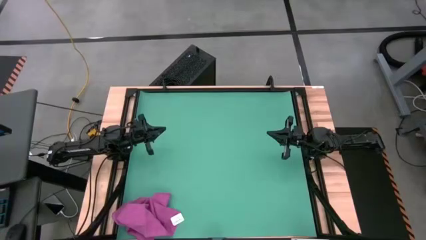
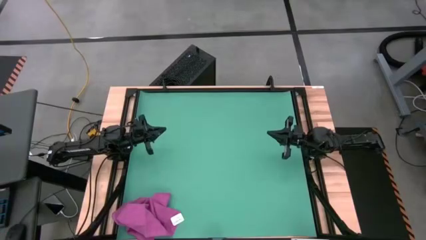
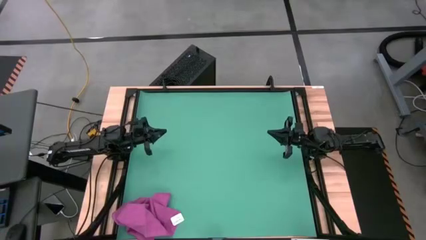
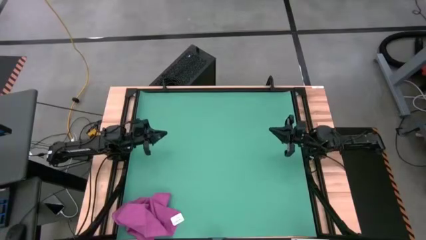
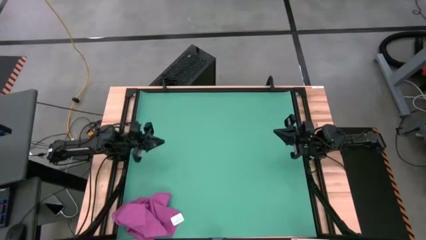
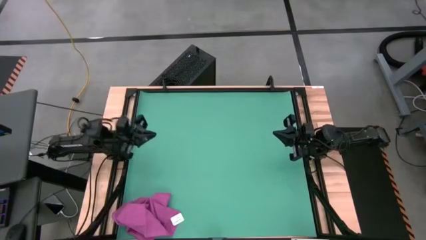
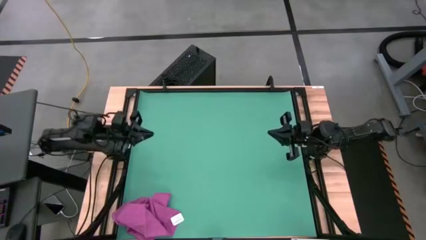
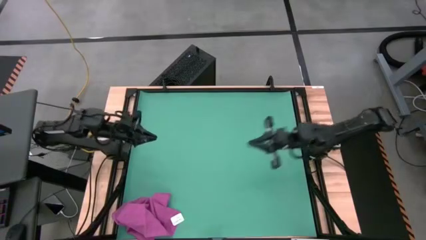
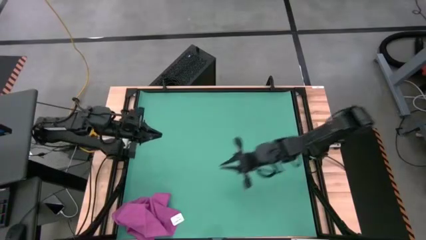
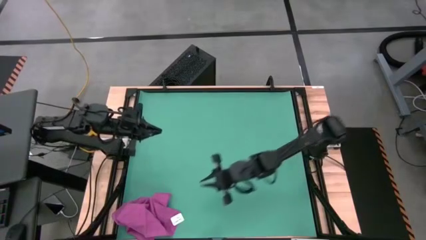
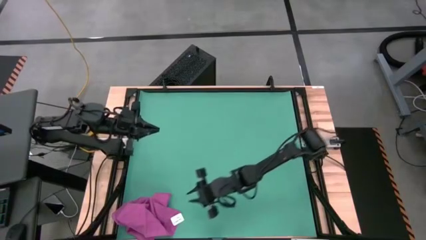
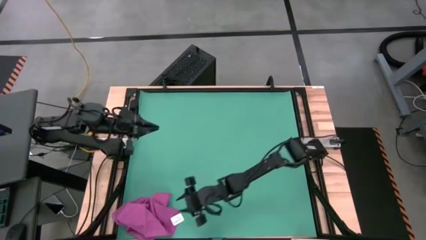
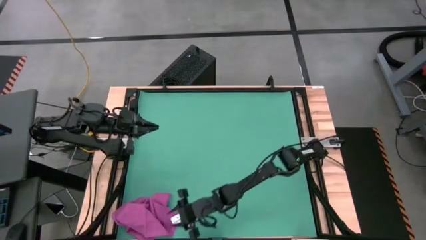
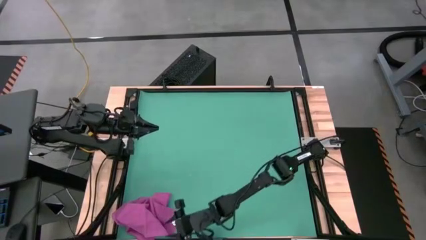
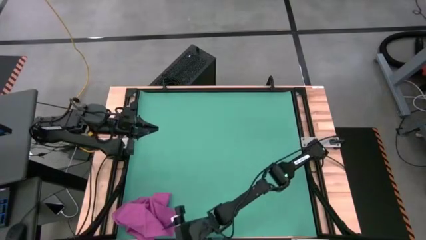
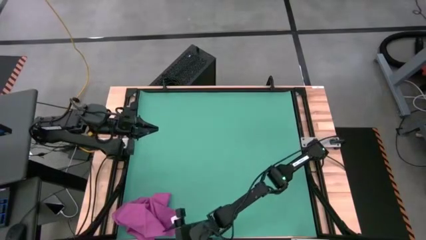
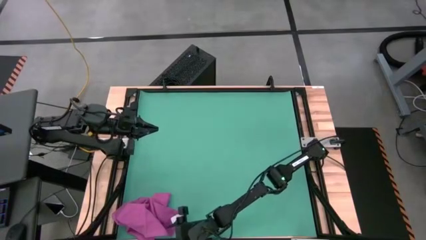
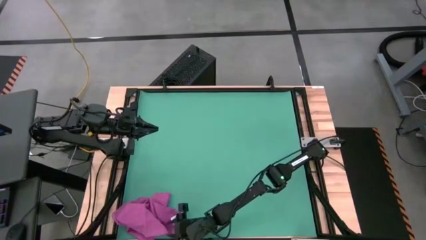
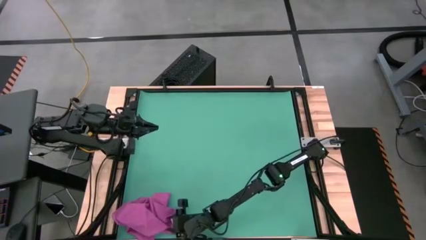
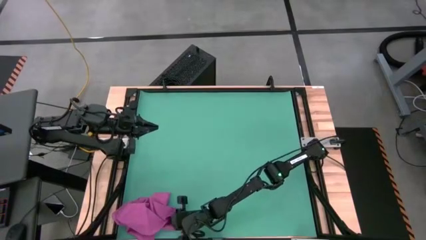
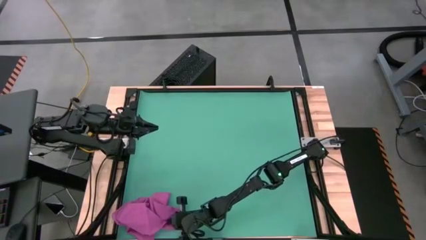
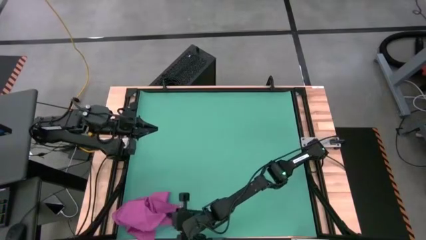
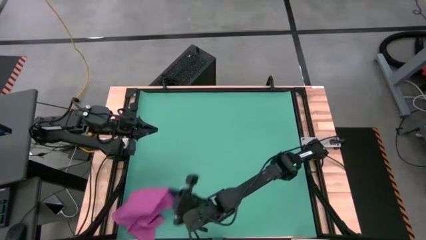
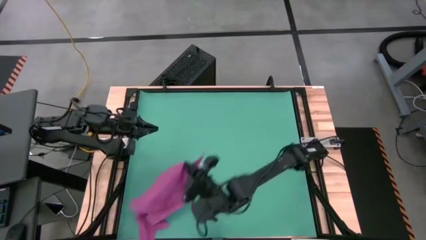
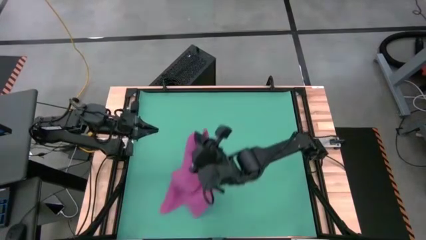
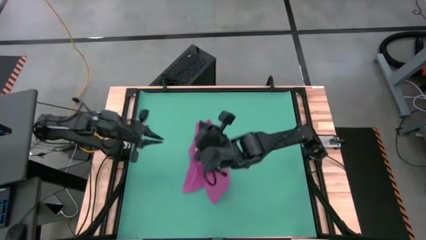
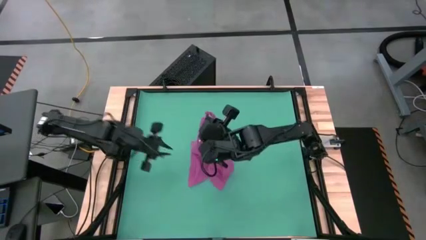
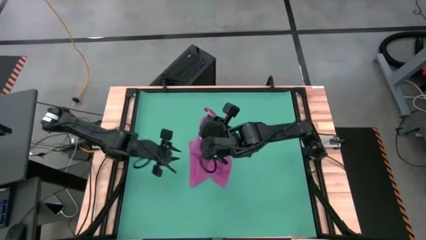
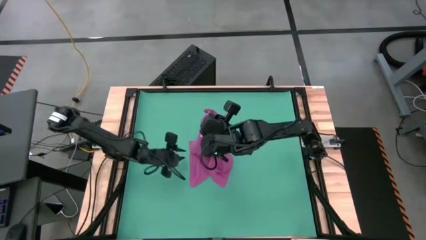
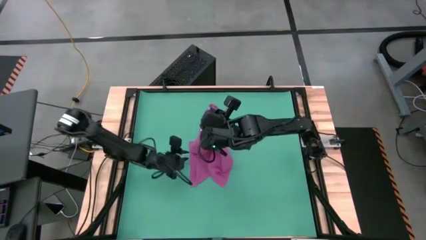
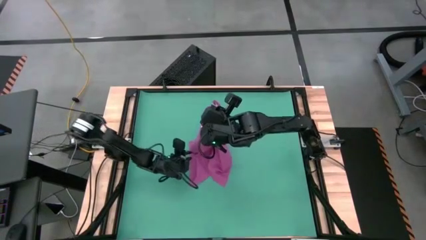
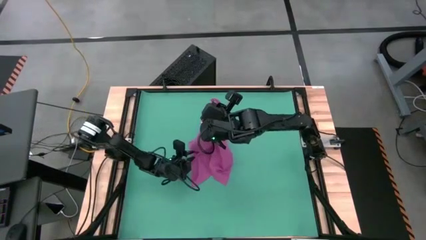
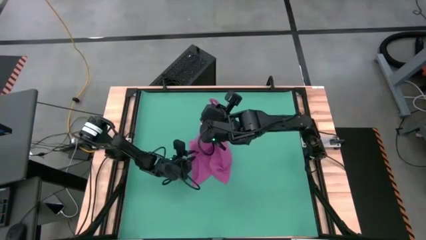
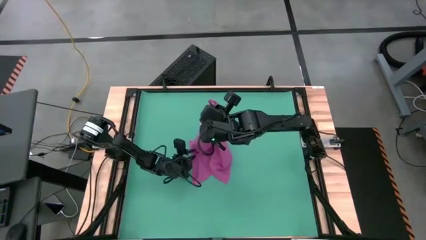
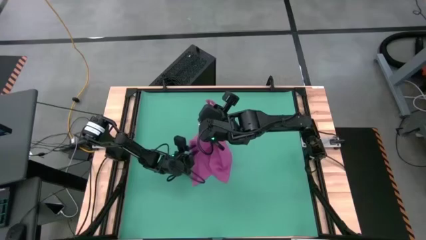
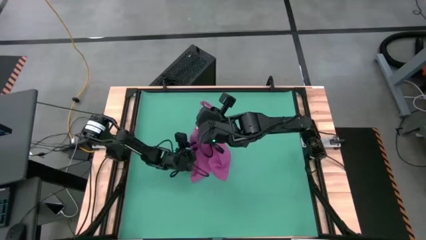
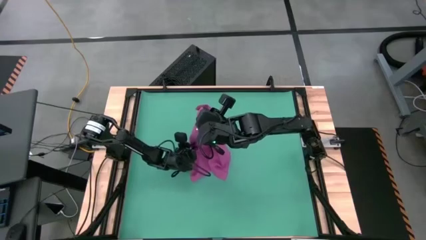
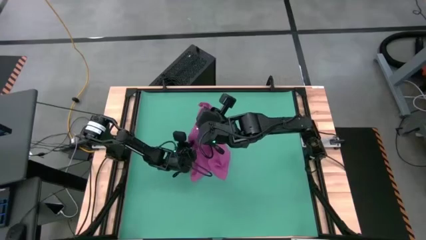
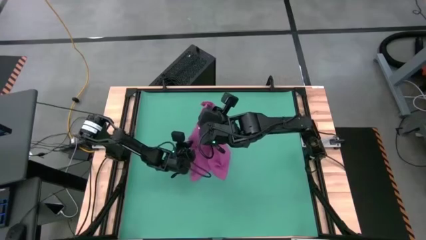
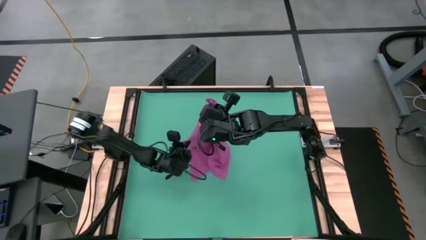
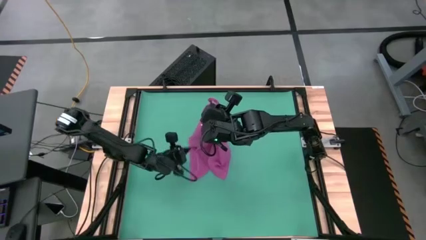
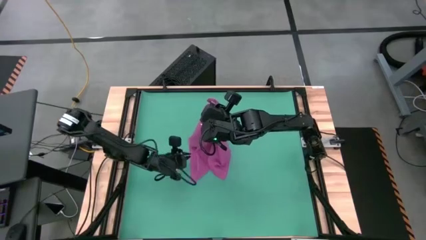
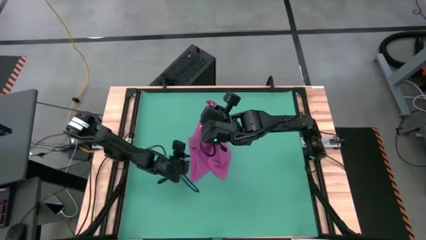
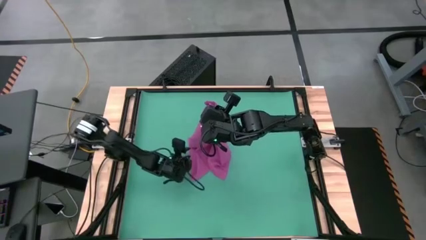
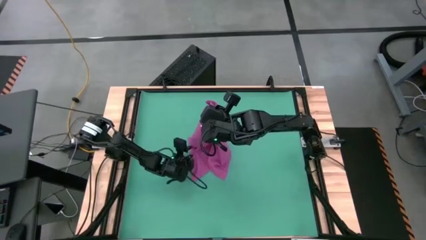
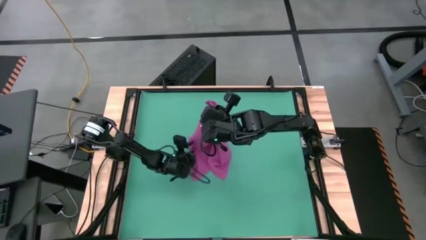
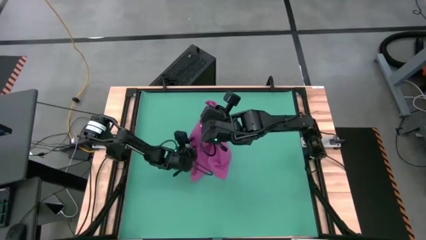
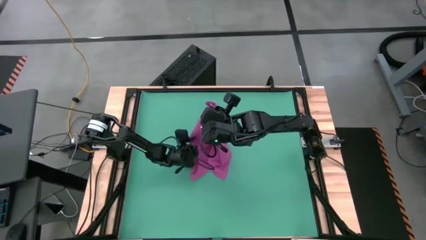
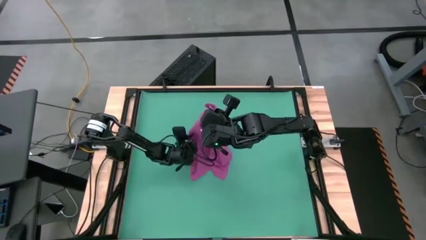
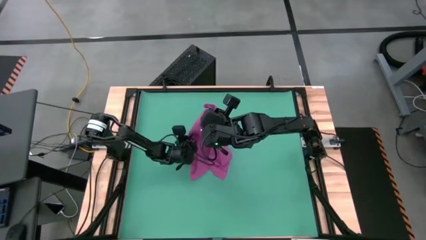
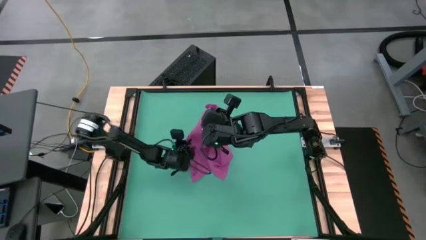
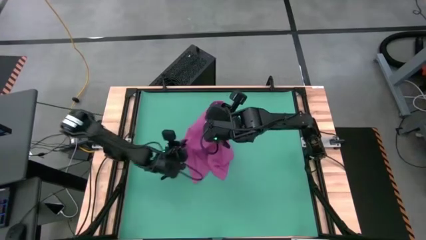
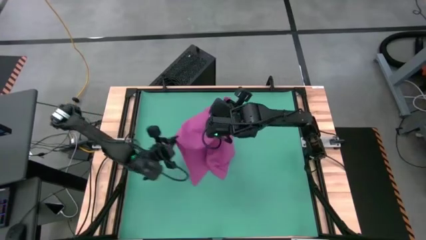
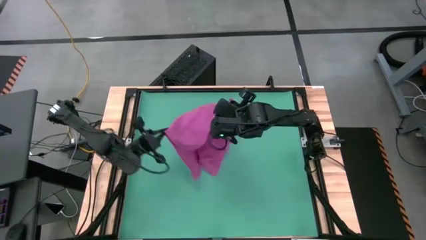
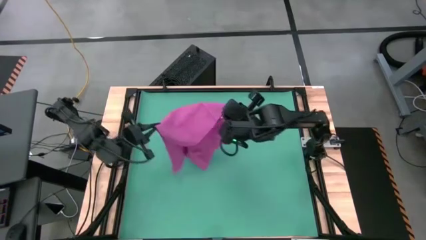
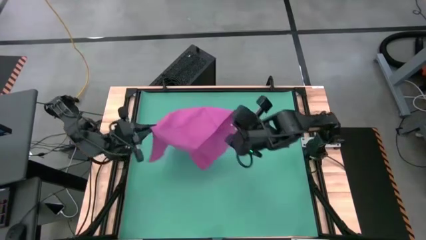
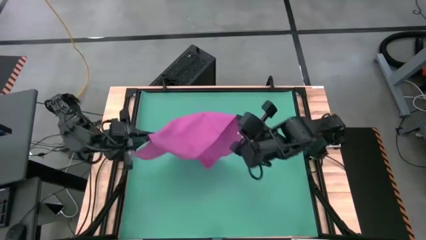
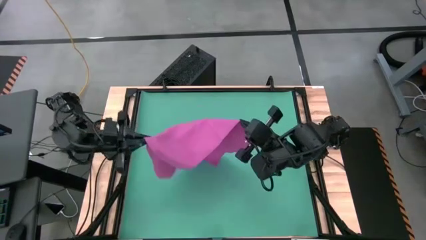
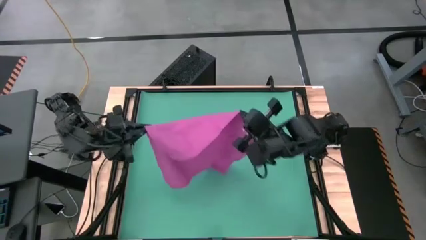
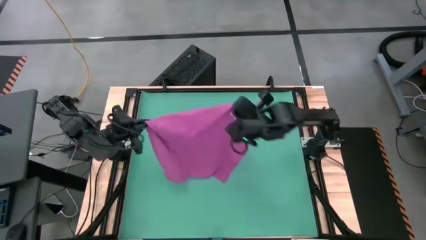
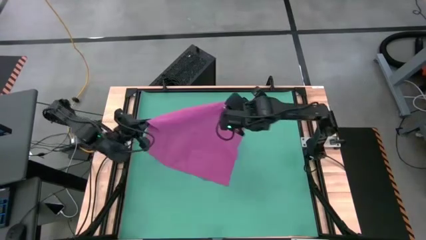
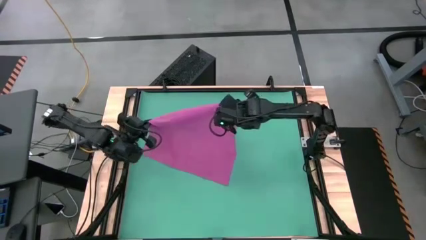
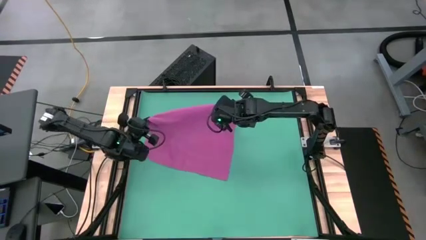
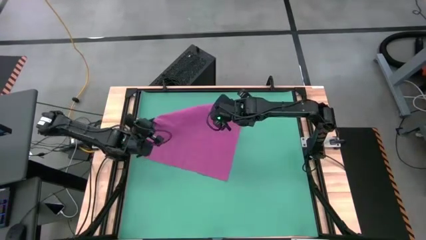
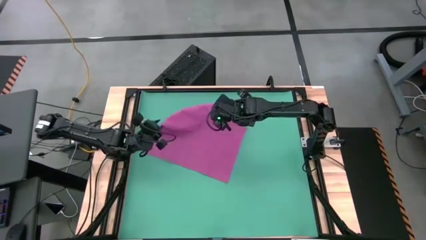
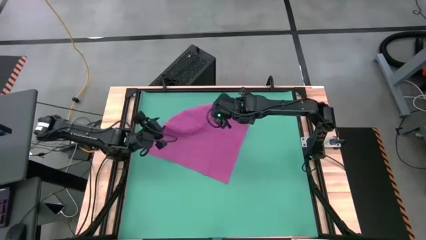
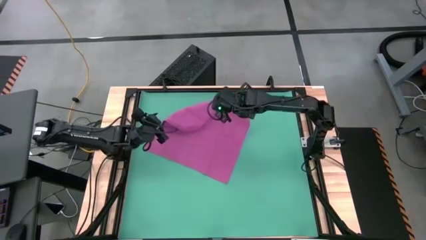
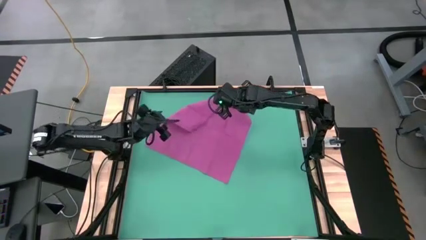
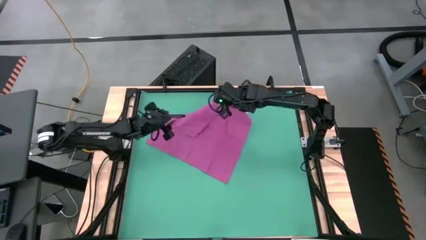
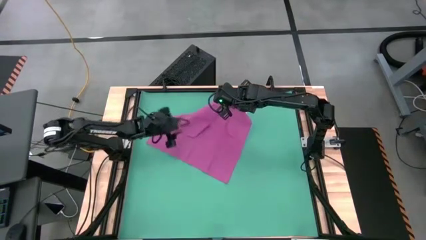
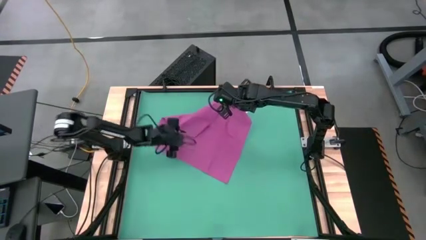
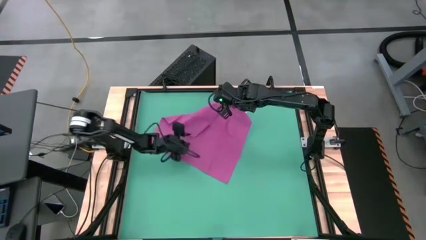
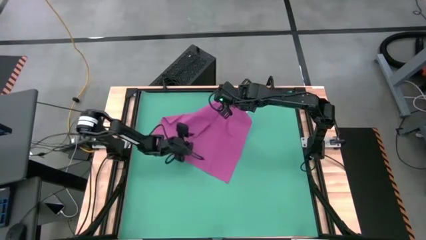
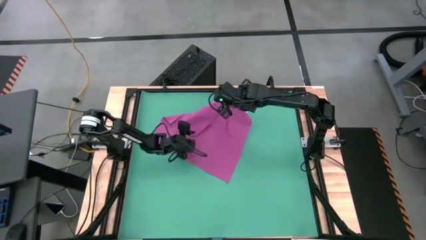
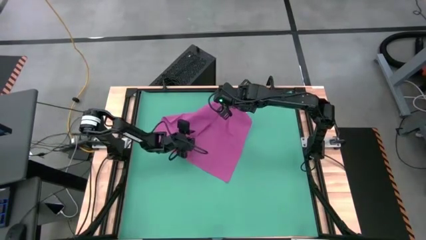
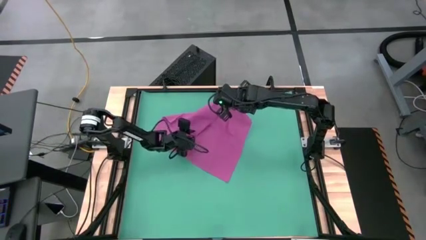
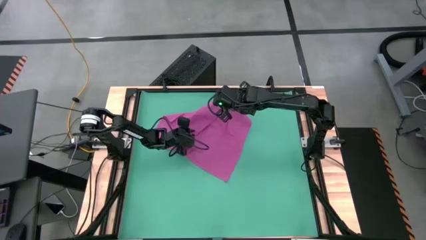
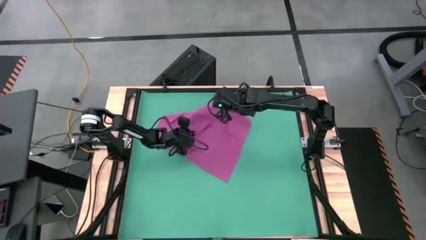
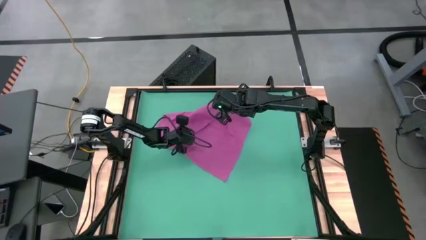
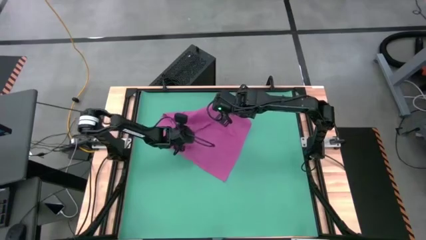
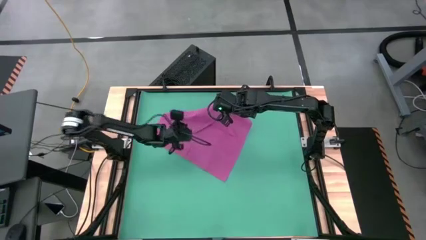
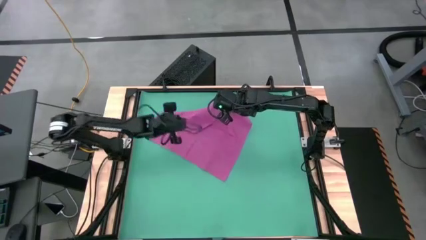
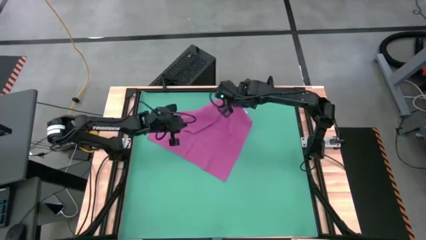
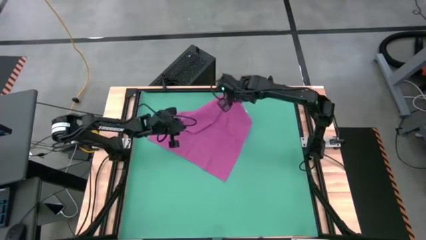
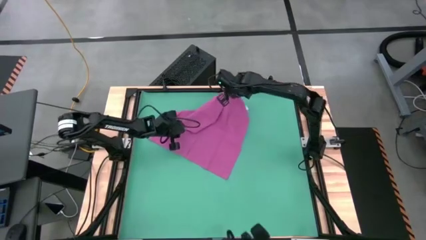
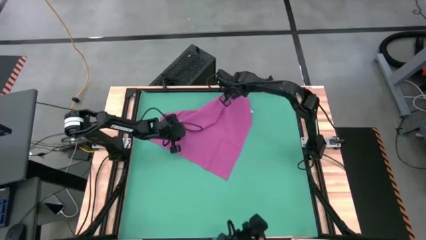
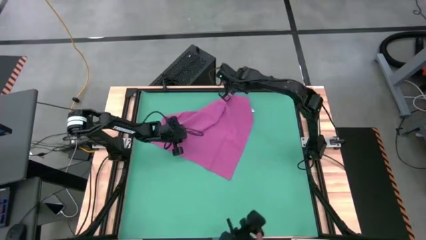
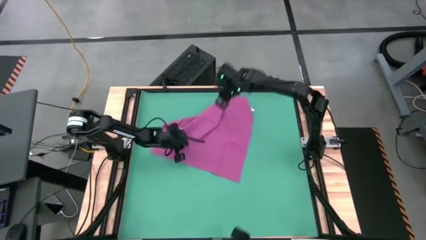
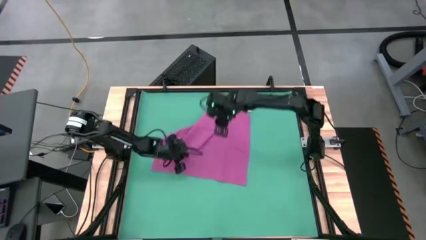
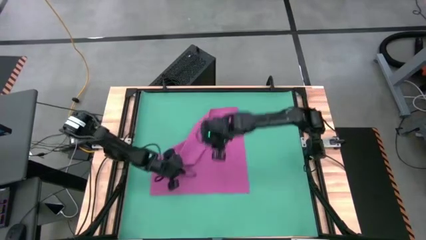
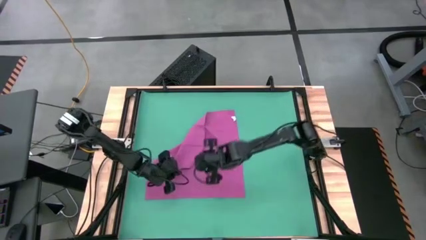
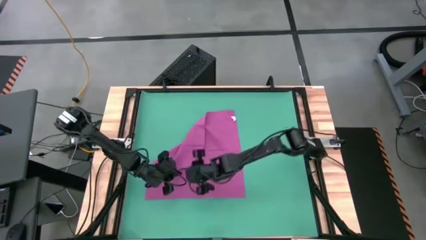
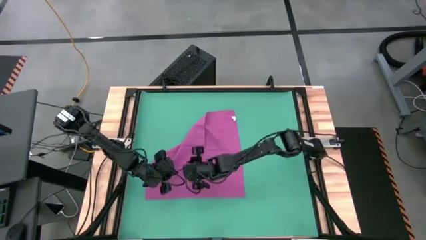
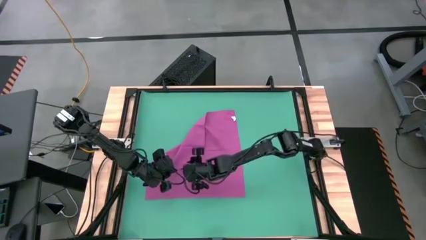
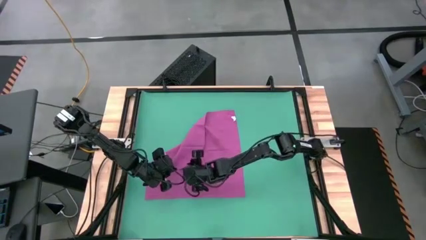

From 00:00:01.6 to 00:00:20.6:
Task: Roll towel
Fold the pink towel
